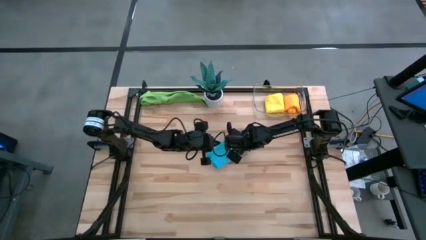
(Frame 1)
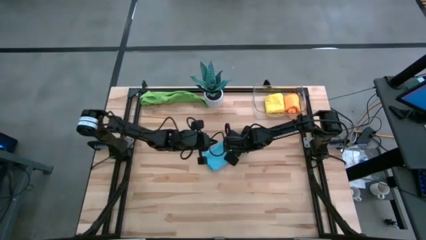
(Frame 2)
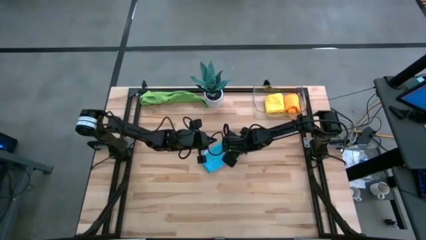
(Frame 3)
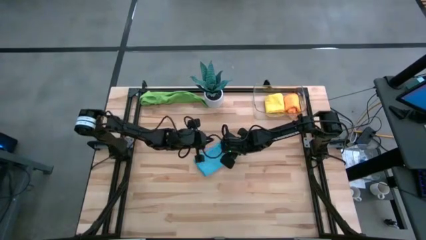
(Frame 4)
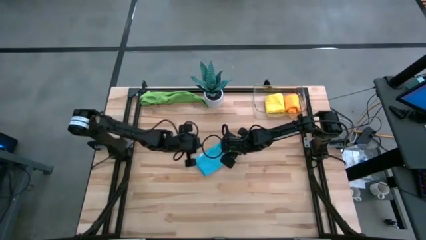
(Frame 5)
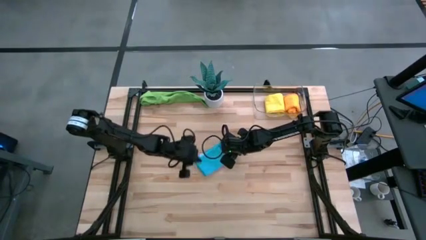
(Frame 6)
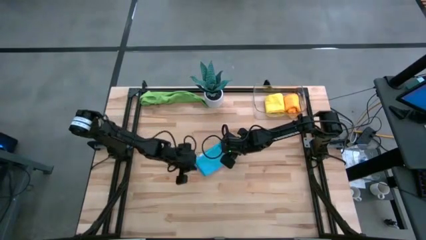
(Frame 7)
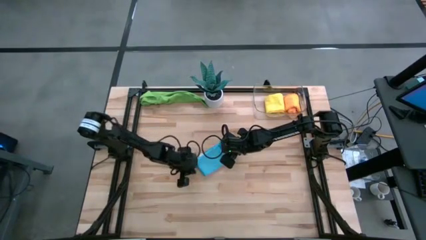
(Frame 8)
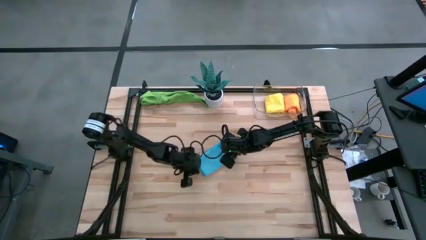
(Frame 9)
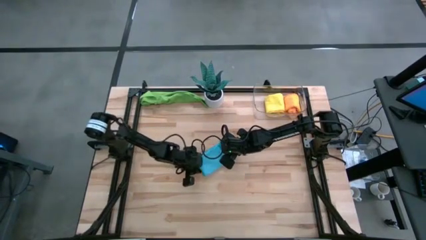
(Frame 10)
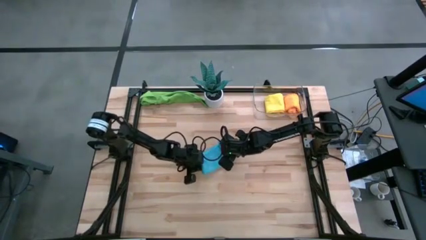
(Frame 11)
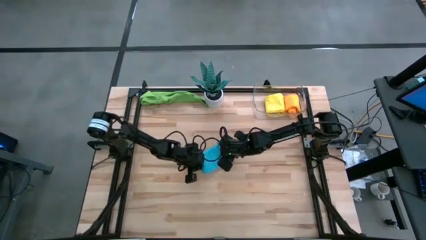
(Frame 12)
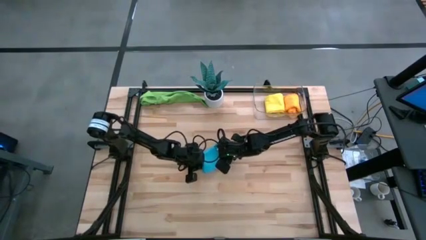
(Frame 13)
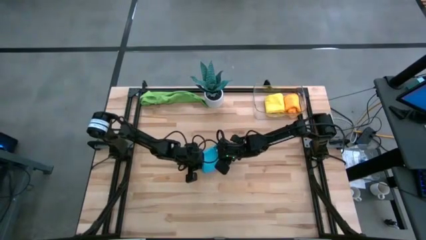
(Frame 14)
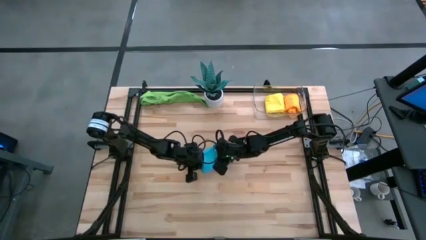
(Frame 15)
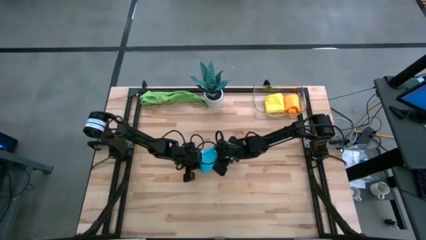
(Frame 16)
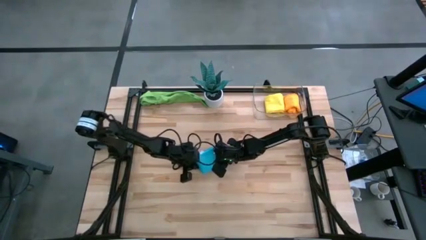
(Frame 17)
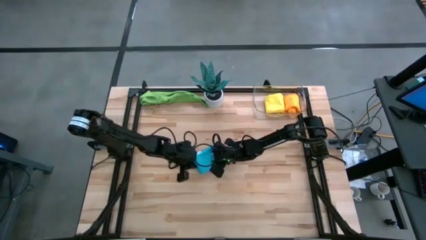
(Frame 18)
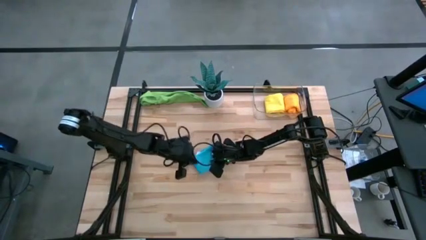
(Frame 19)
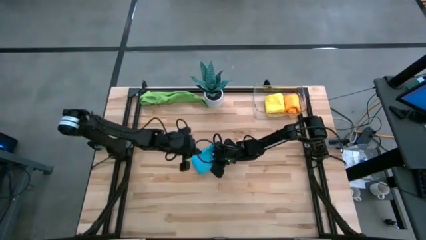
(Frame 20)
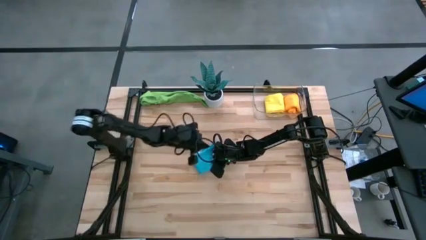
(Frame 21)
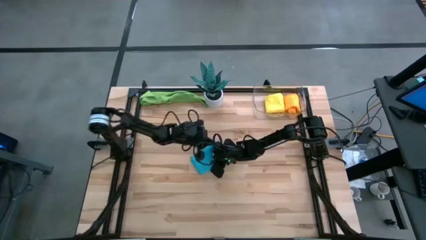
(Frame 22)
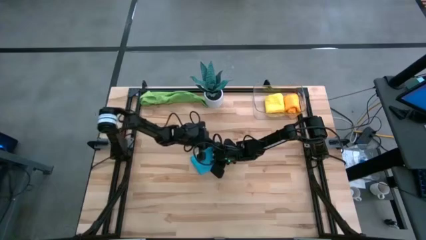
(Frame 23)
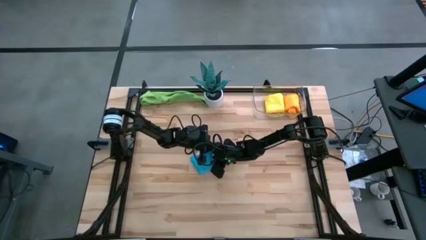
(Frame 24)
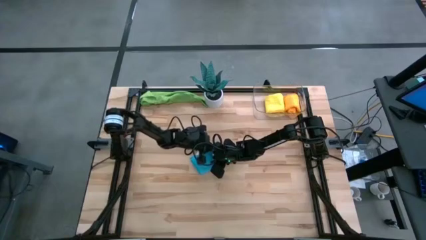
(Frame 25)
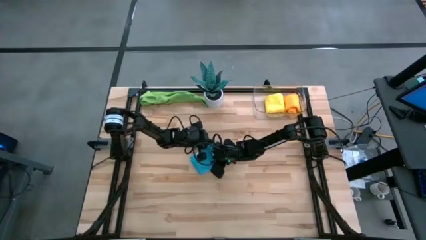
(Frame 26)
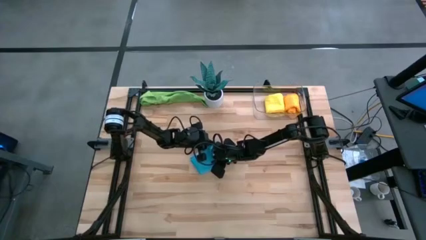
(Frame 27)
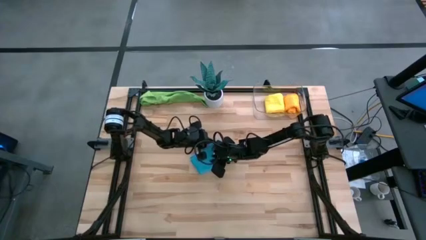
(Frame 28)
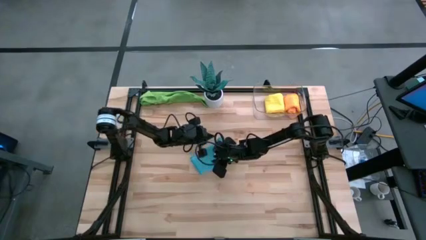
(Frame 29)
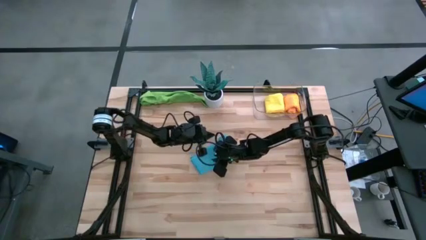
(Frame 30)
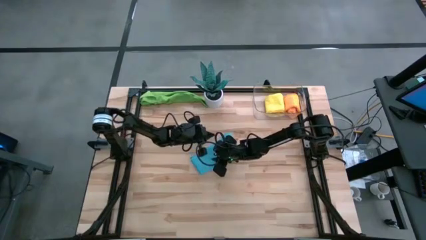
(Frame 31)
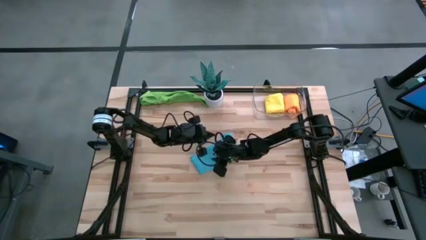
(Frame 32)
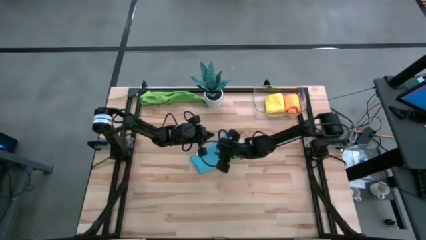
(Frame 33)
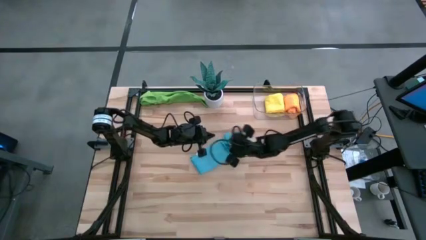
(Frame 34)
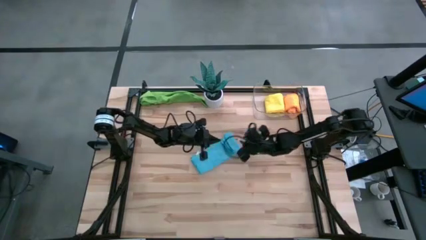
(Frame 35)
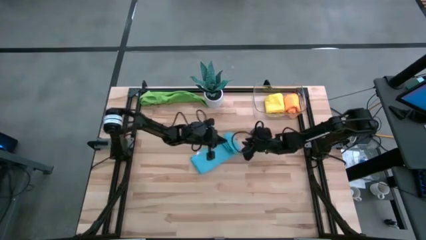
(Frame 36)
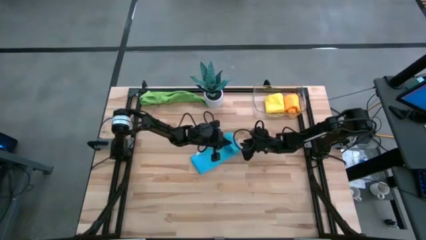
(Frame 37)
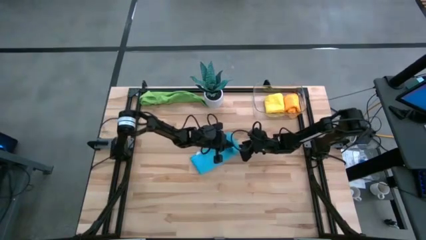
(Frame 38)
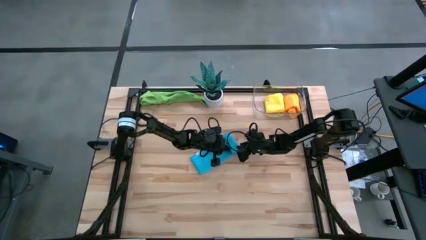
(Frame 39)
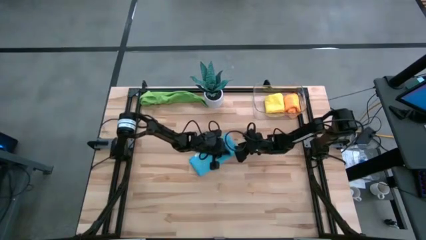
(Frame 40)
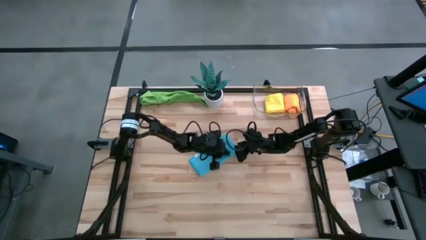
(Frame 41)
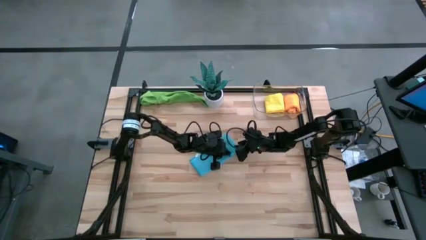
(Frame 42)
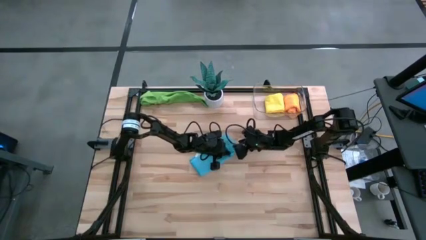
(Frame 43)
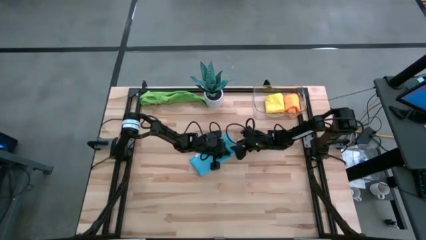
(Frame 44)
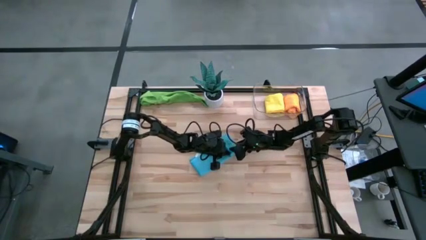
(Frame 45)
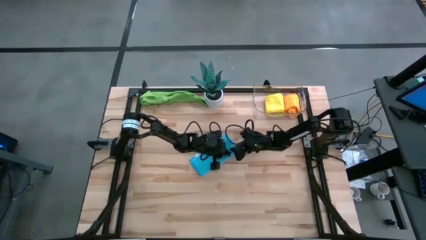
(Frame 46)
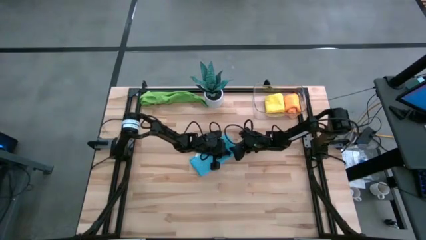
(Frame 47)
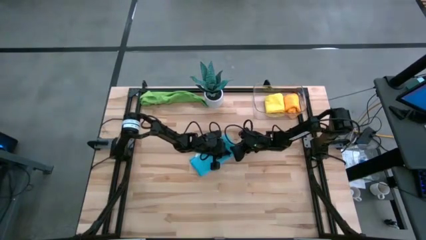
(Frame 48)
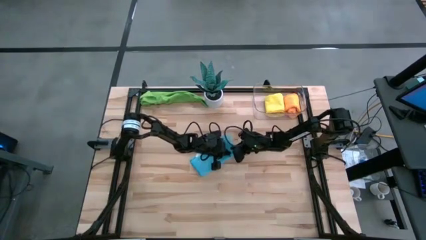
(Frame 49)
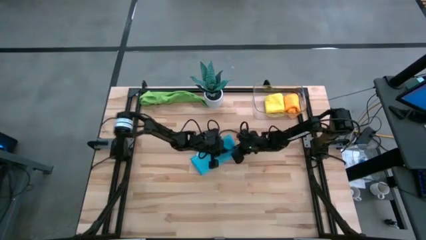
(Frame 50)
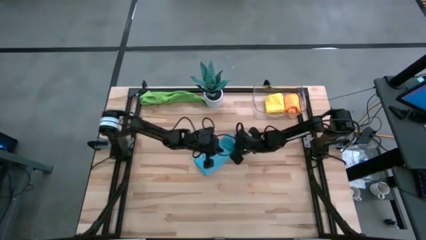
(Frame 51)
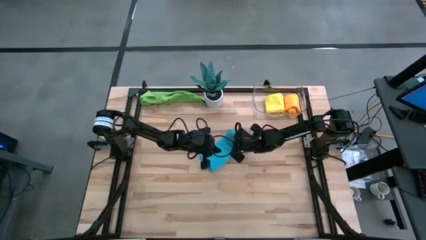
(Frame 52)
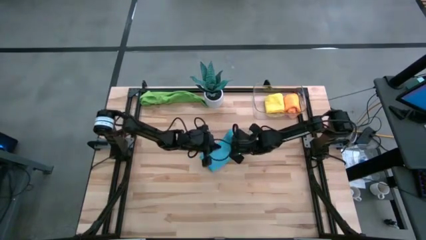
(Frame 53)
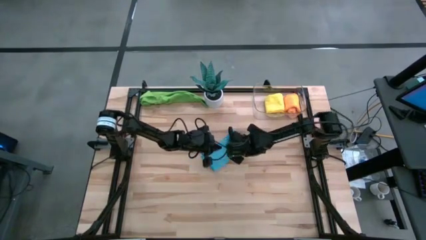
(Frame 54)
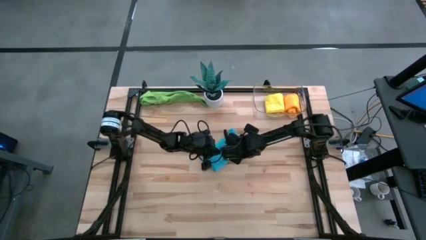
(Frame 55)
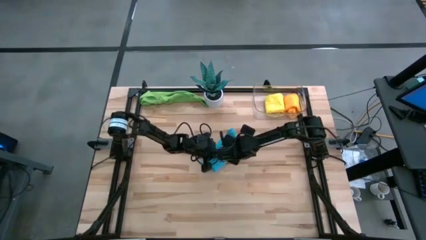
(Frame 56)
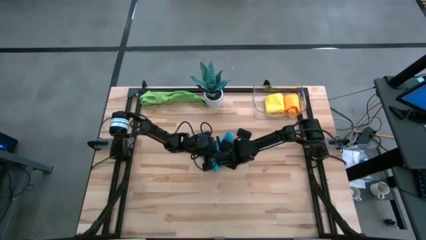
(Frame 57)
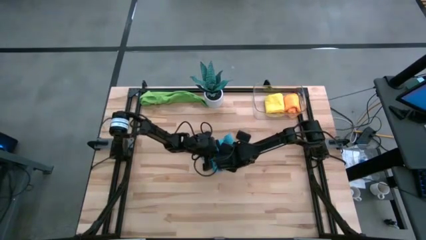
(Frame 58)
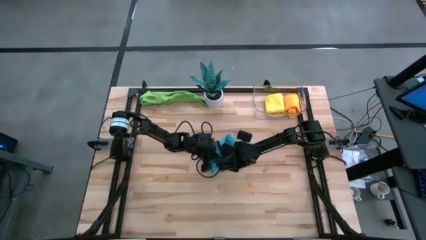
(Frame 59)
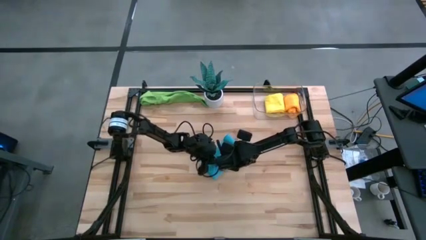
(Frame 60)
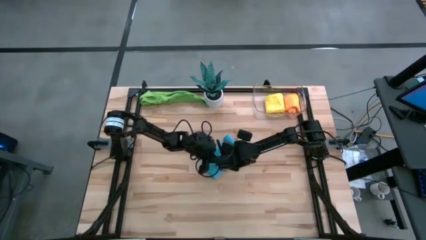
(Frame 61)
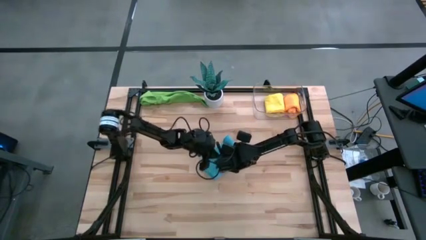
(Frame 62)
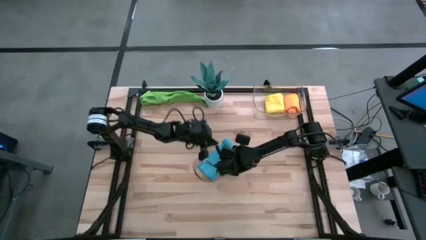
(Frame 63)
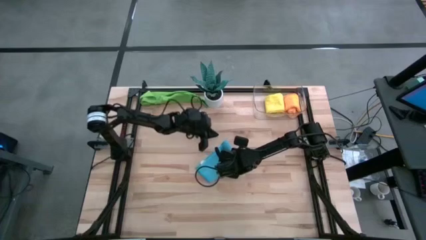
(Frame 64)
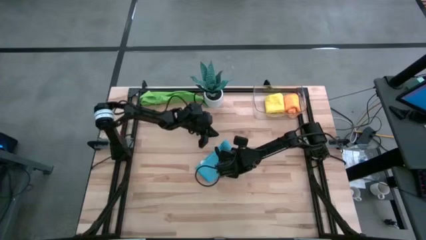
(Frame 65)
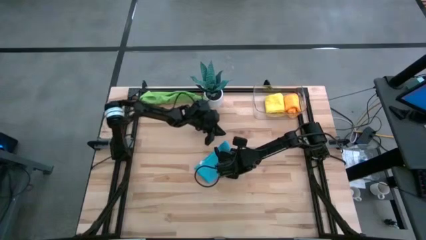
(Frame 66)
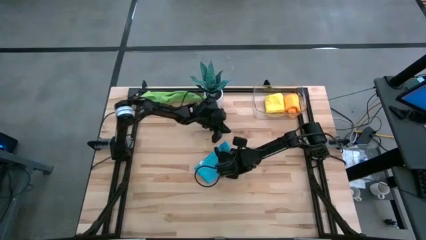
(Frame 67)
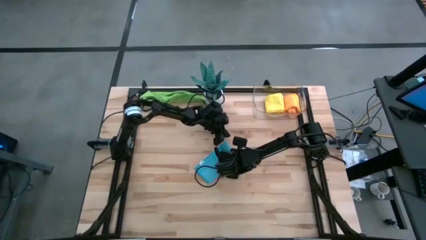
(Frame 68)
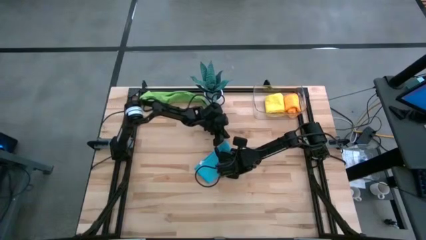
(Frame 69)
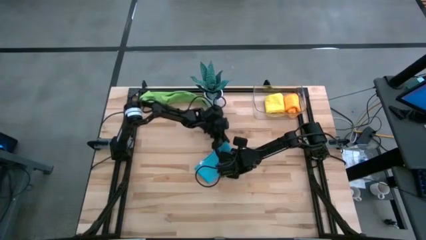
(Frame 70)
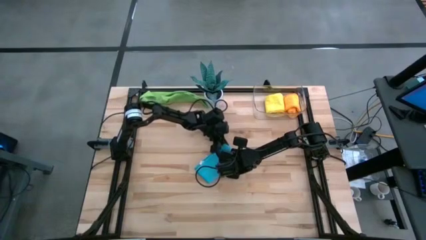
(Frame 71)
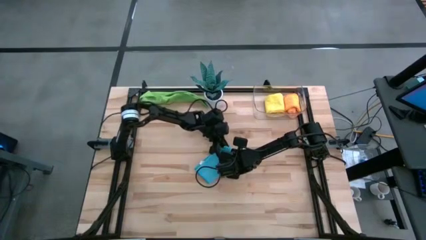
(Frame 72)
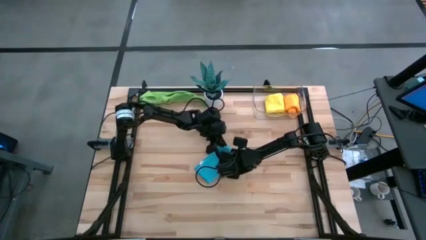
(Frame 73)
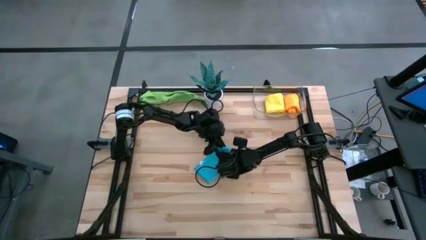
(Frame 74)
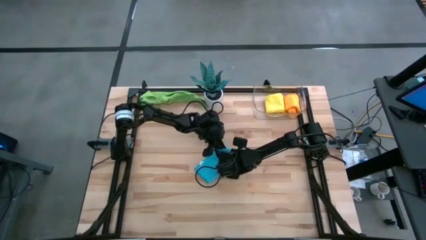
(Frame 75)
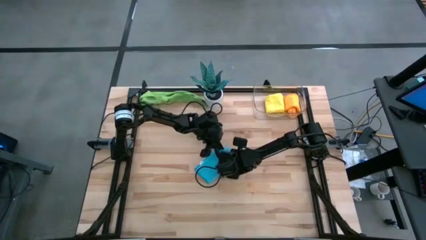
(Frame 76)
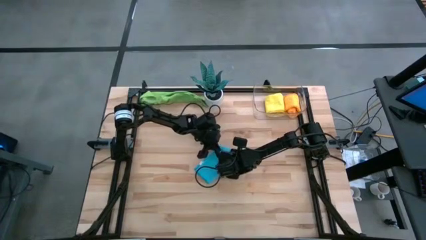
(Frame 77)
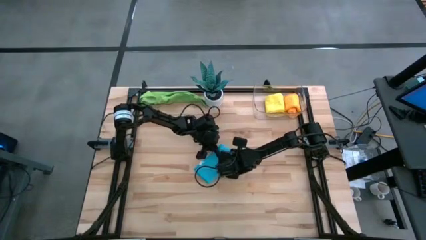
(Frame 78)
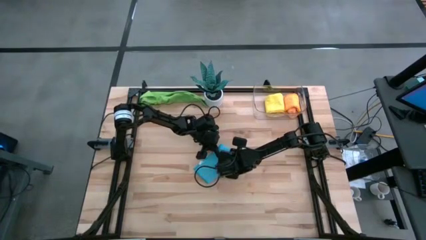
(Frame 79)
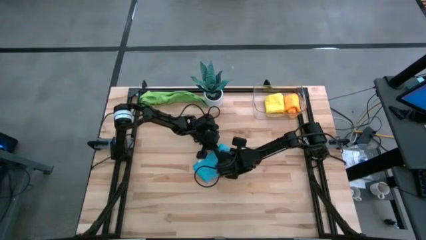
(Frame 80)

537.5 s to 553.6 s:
Task: Roll microfiber towels into tight, uniform cylinder then place into a basket
Roll the blue microfiber cloth
